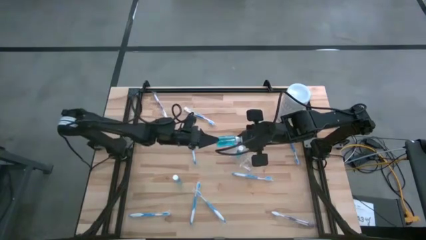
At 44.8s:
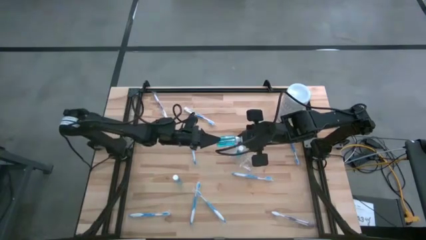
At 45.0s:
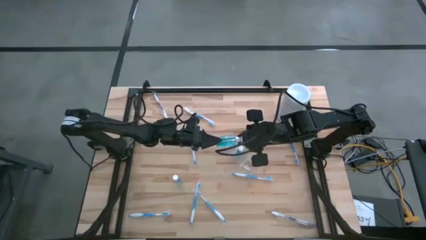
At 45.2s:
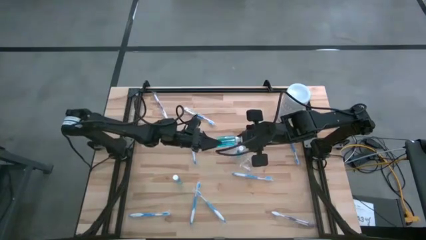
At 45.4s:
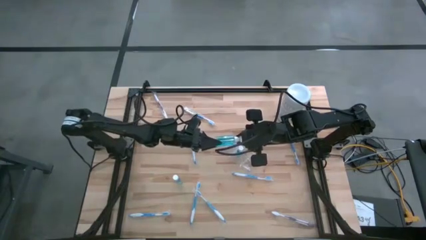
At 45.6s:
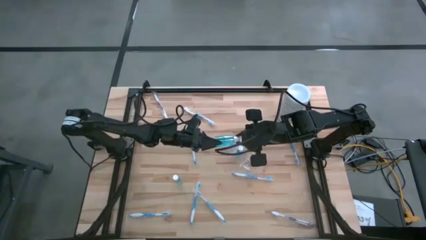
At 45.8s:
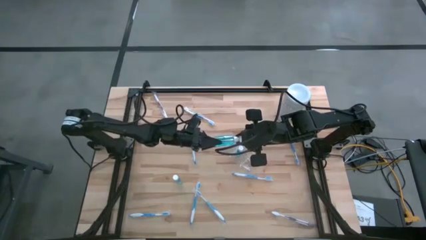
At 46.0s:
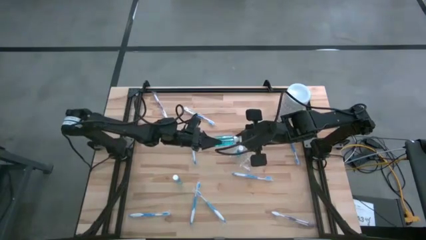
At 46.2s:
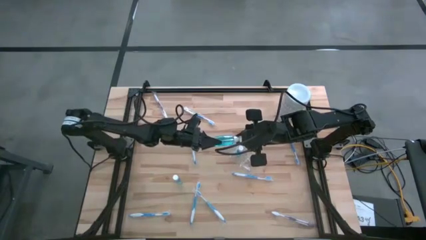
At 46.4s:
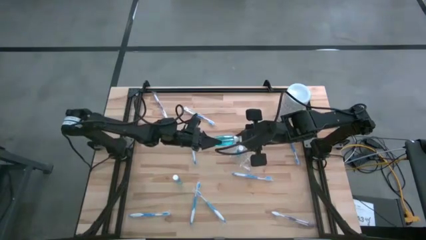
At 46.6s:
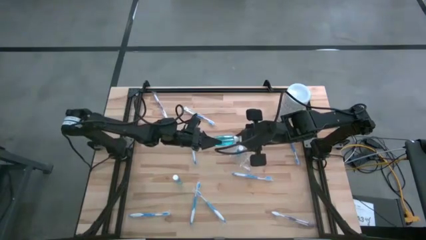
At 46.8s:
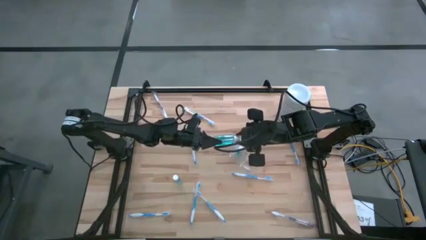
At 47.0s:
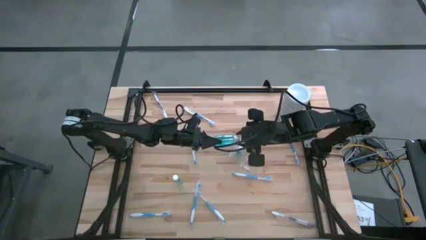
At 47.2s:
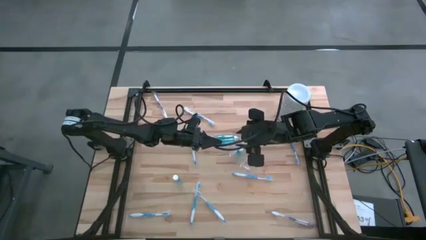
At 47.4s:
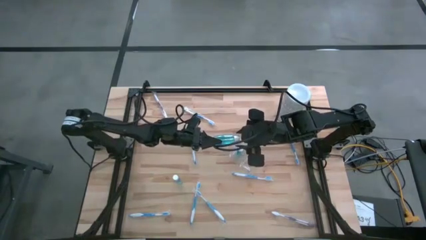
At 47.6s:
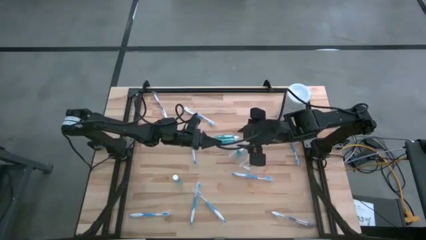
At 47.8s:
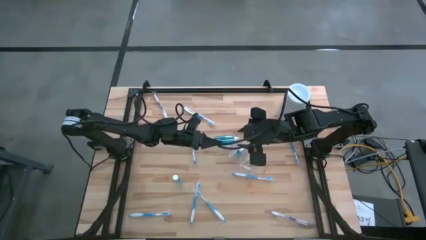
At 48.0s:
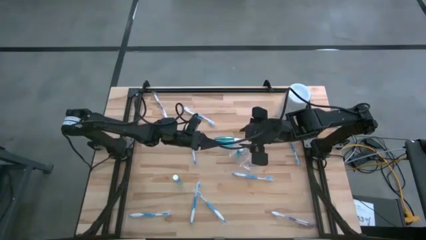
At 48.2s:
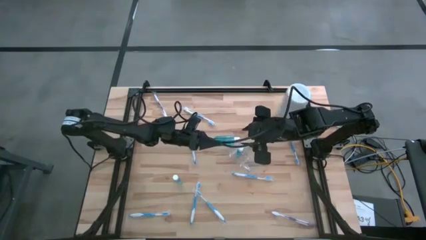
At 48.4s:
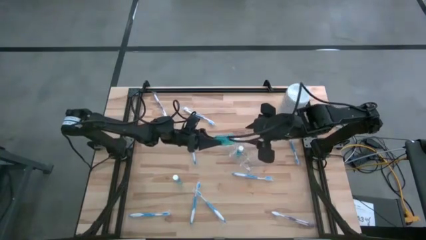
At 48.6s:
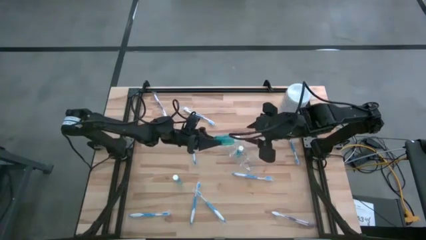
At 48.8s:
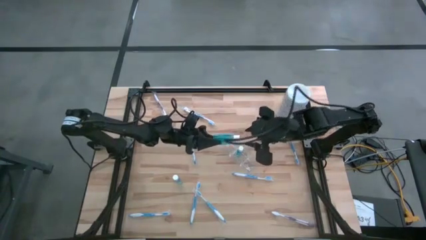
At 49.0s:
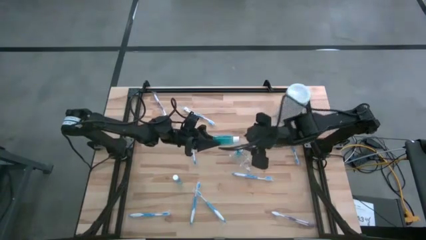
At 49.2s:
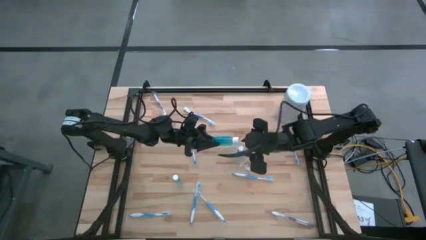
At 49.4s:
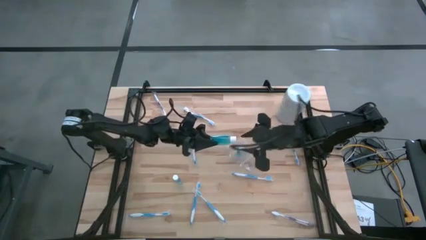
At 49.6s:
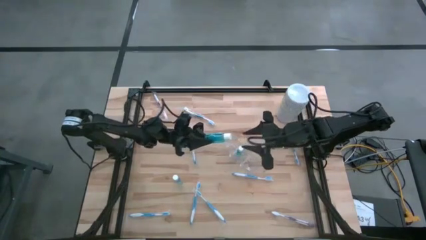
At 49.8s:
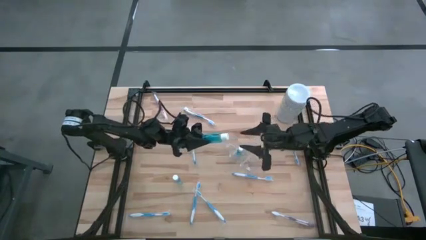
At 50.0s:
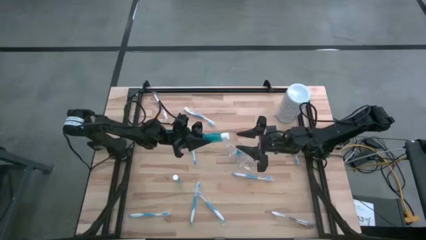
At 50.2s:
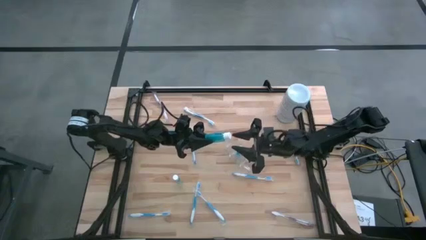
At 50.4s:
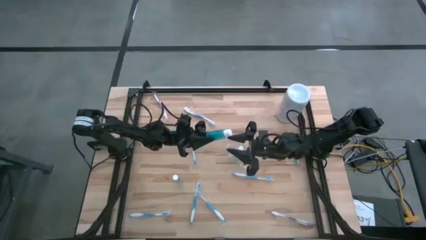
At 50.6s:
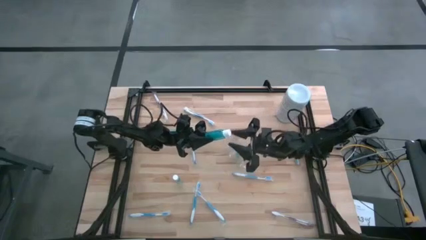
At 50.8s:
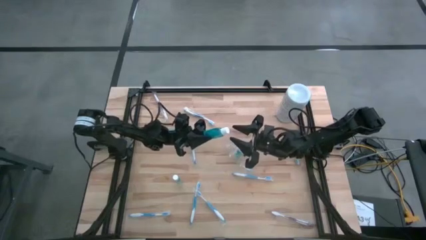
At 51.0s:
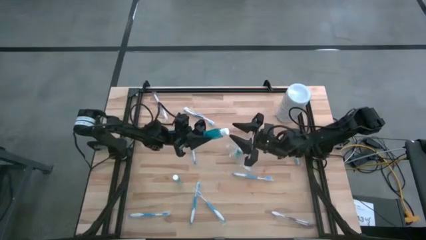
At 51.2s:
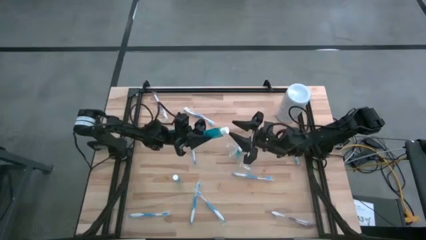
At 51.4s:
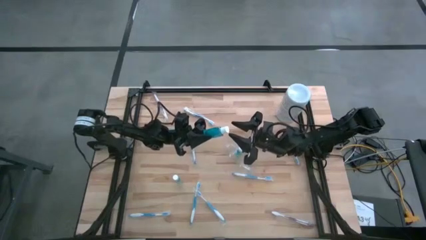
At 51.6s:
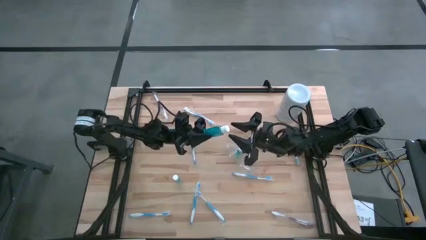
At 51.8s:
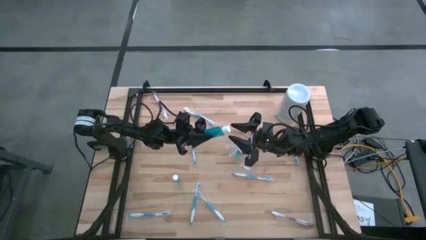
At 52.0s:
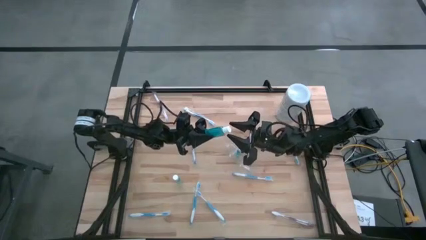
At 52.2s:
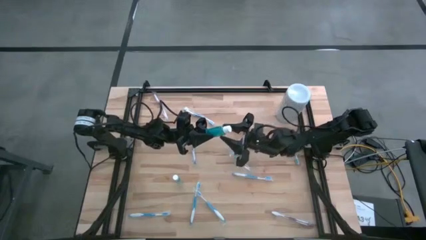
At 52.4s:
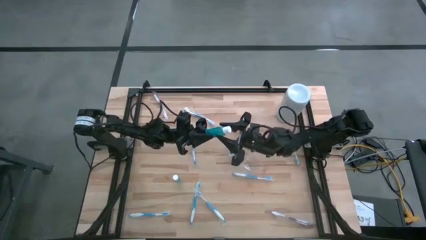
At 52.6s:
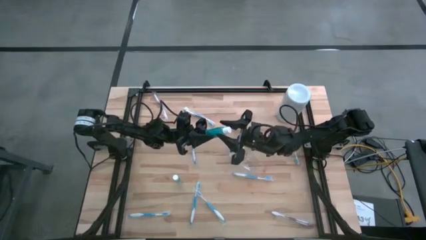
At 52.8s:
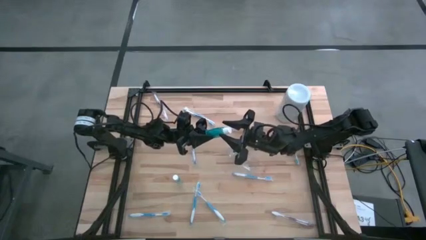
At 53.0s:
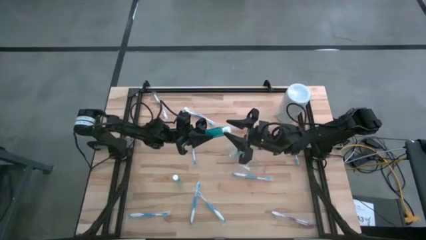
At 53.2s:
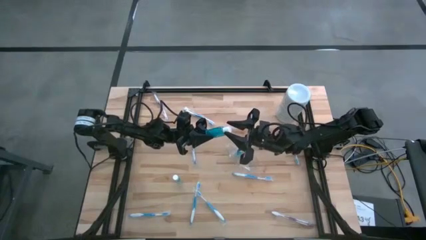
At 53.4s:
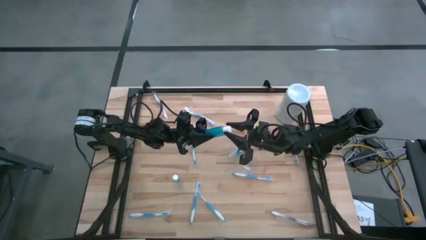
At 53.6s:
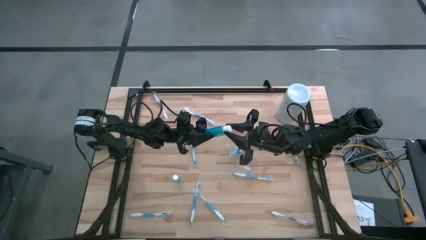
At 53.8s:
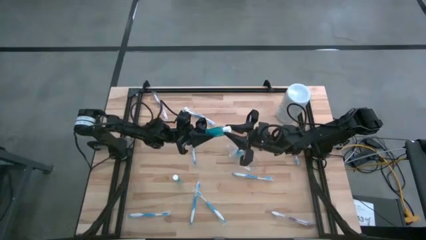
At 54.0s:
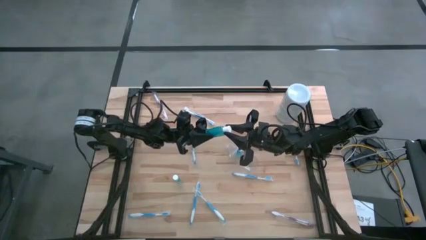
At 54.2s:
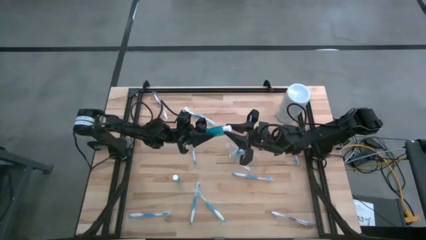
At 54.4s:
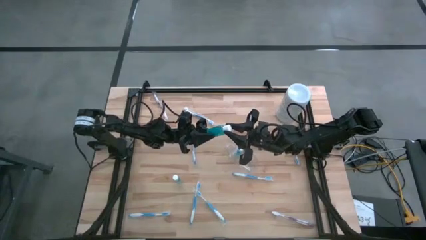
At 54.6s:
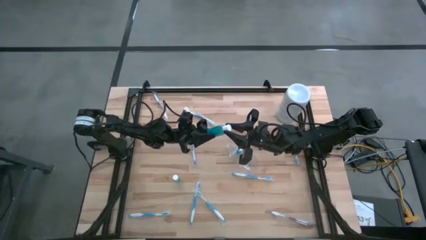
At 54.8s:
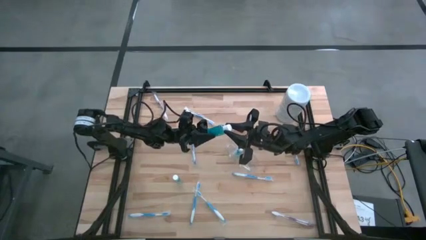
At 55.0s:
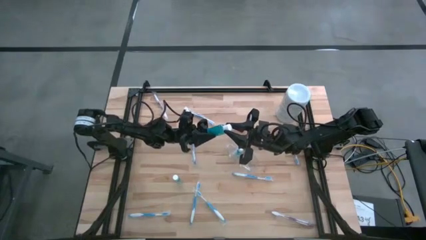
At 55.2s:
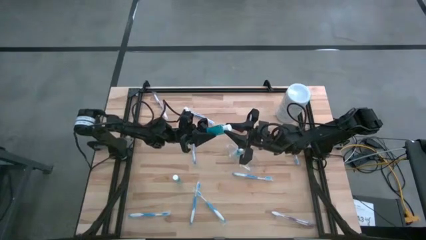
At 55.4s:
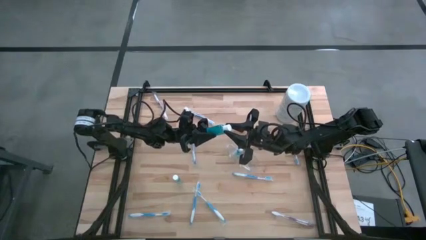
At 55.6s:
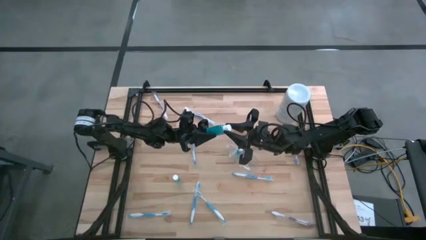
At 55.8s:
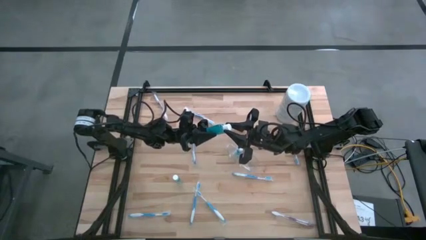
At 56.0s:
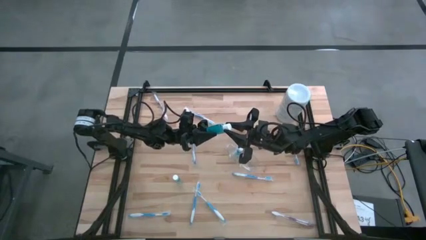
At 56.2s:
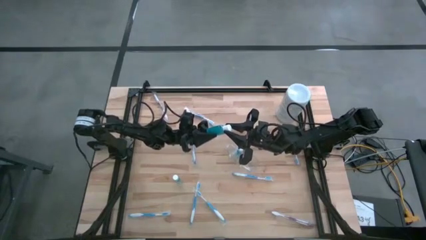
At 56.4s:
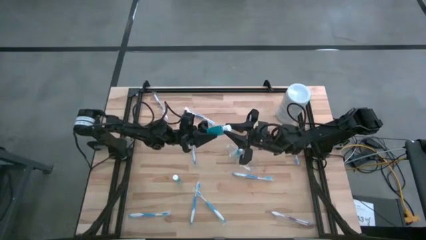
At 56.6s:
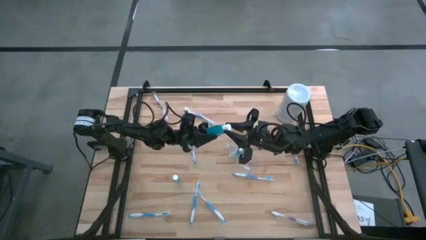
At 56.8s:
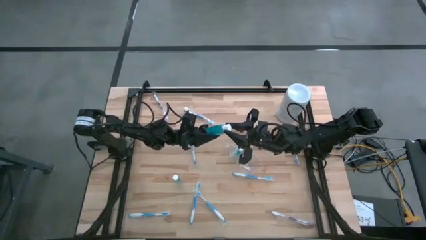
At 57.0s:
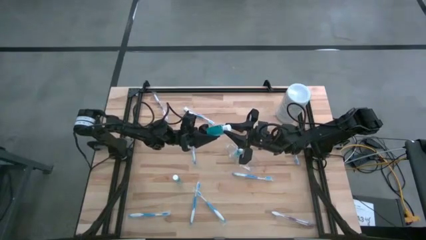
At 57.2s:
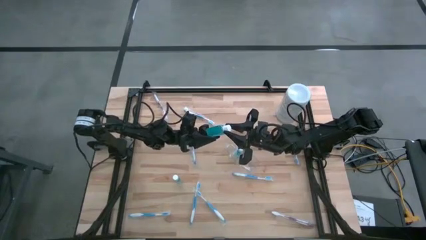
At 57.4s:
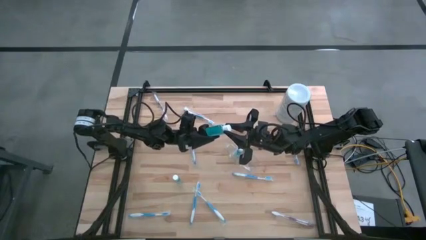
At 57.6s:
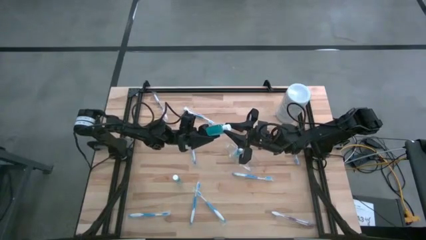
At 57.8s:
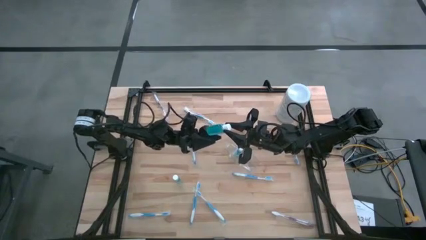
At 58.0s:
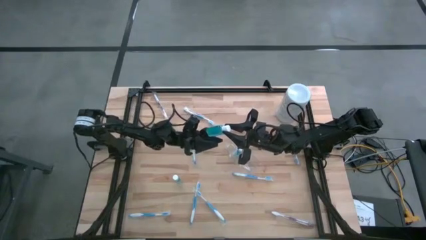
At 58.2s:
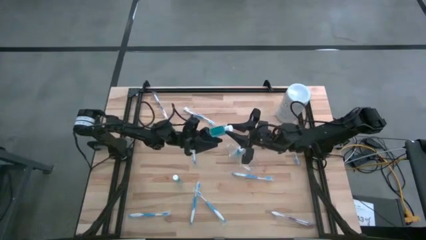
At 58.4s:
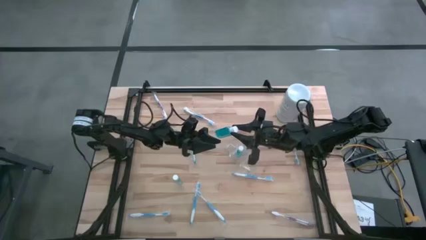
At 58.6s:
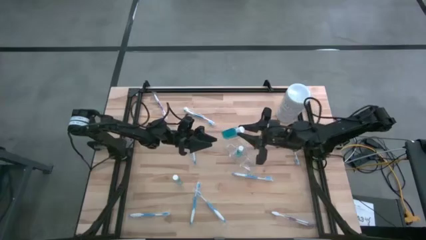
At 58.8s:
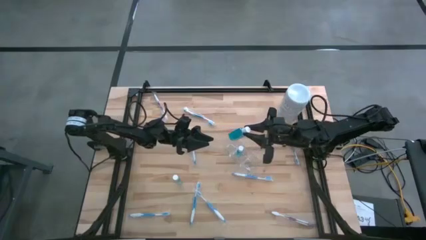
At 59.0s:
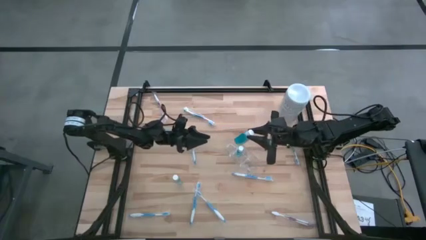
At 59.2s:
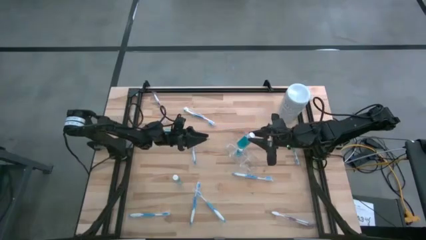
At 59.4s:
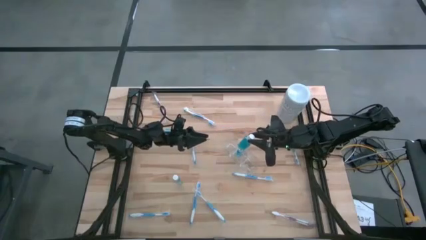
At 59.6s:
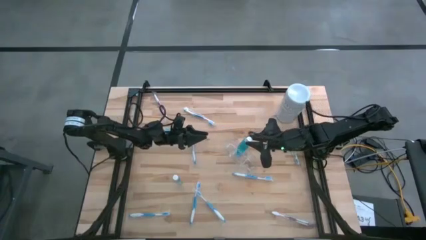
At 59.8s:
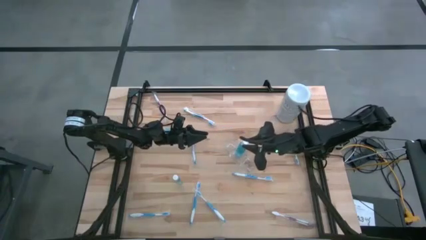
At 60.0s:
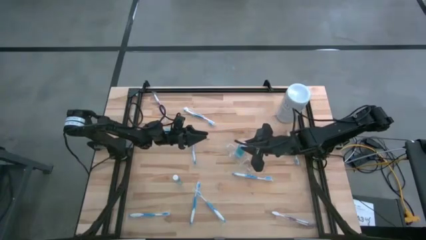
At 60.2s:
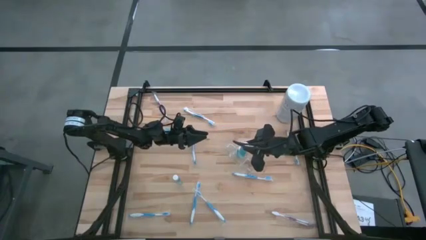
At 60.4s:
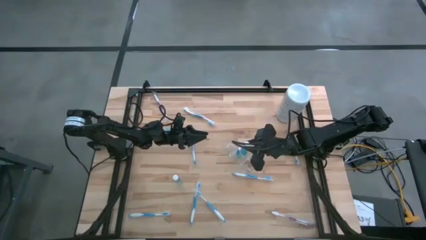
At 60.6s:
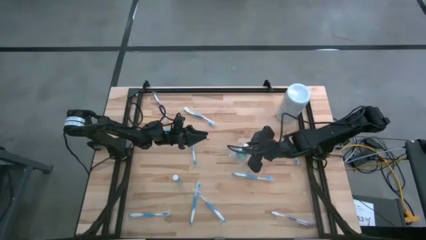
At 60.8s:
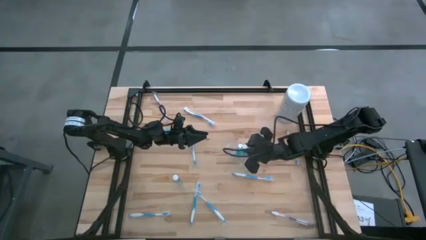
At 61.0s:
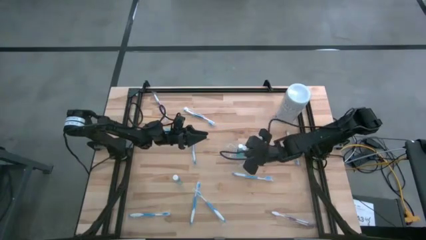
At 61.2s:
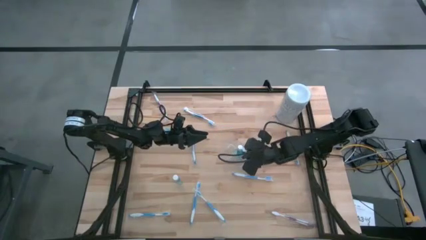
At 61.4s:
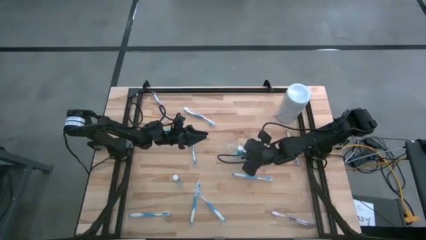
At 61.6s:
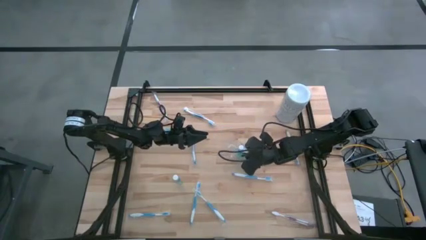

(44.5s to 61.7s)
Task: Pick & Place toothbrushing station
Put the blue mouthwash into the middle section of the transparent organizer
